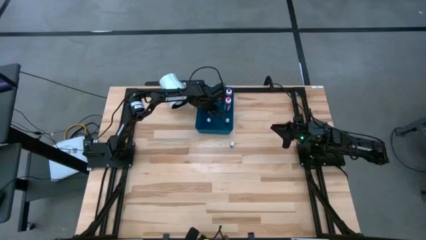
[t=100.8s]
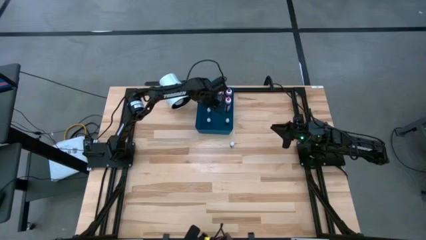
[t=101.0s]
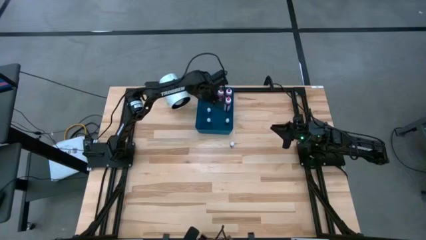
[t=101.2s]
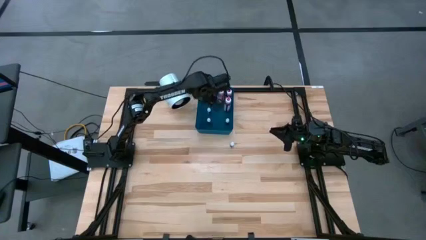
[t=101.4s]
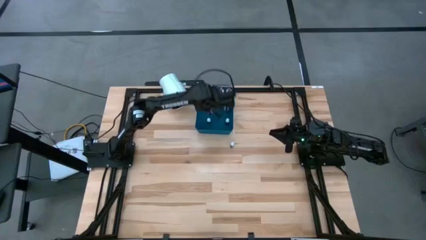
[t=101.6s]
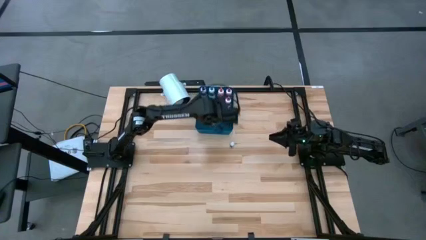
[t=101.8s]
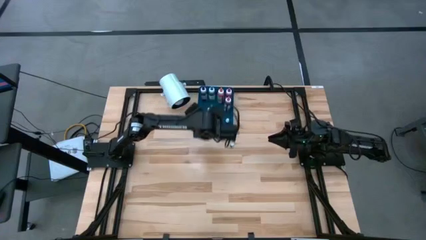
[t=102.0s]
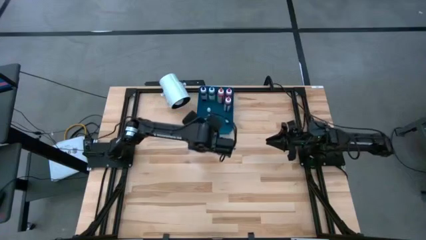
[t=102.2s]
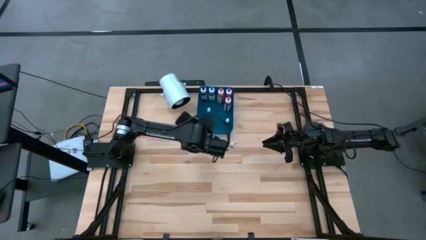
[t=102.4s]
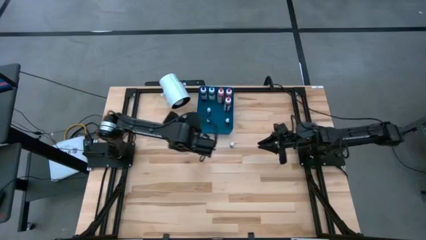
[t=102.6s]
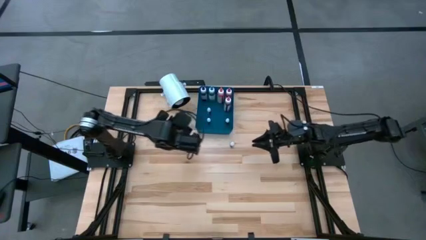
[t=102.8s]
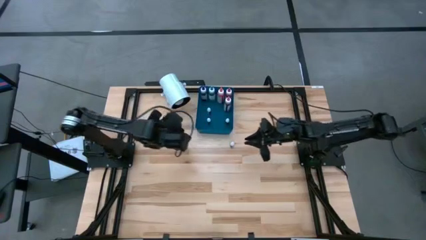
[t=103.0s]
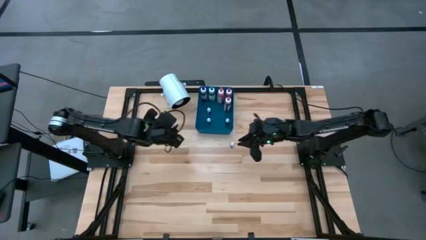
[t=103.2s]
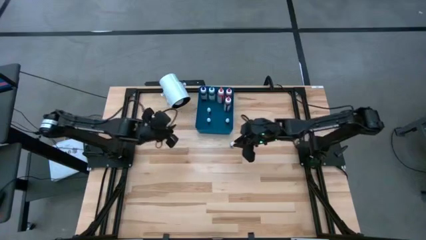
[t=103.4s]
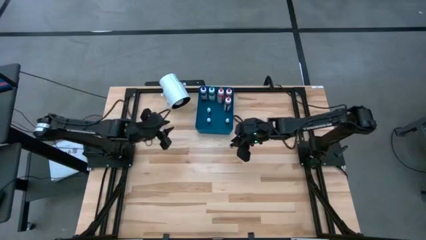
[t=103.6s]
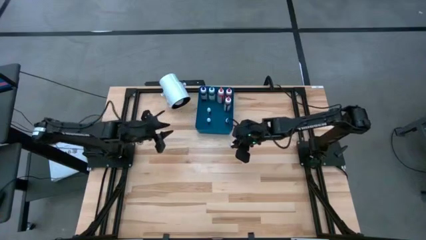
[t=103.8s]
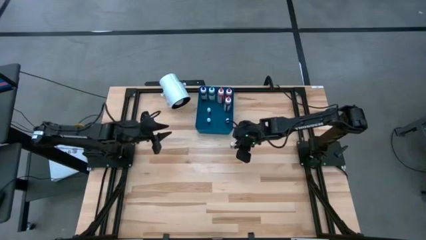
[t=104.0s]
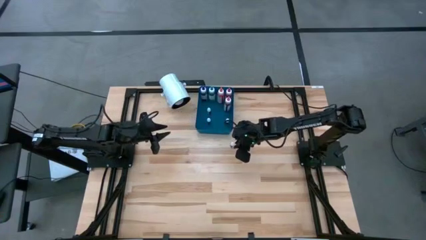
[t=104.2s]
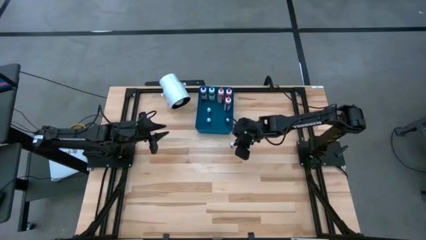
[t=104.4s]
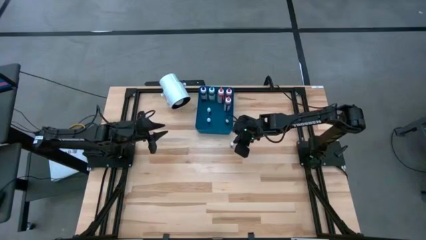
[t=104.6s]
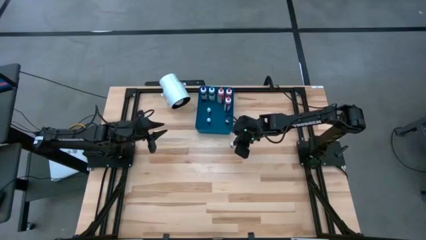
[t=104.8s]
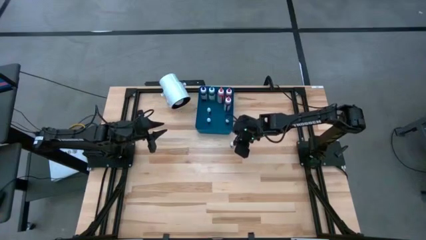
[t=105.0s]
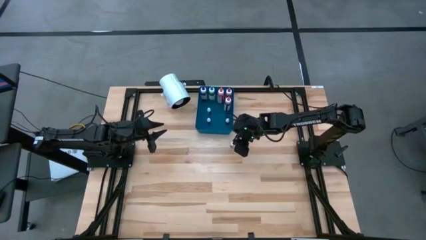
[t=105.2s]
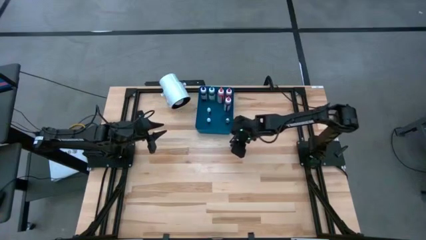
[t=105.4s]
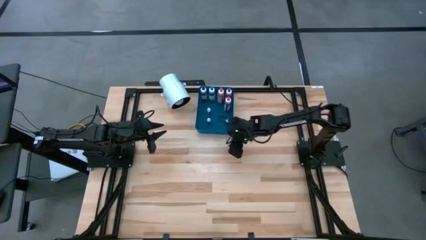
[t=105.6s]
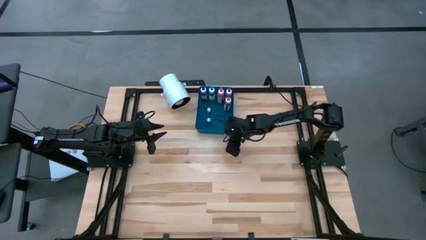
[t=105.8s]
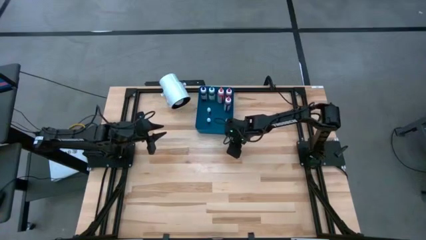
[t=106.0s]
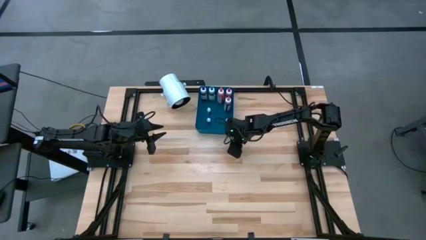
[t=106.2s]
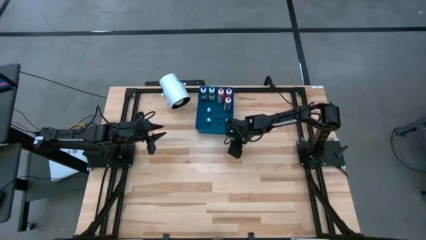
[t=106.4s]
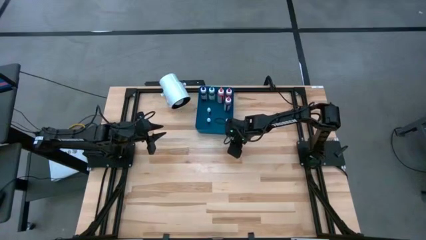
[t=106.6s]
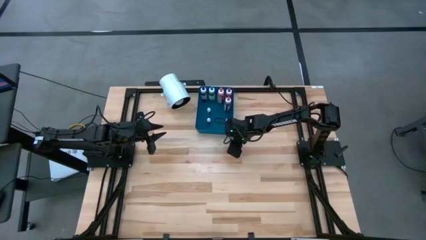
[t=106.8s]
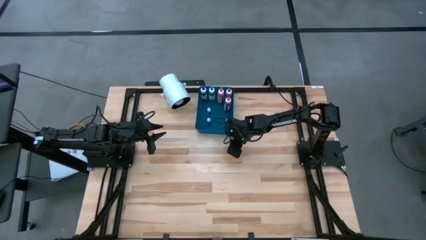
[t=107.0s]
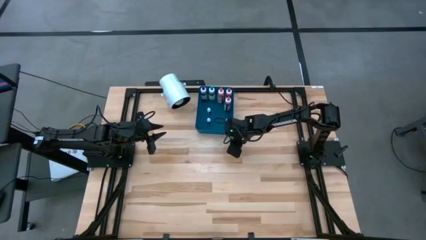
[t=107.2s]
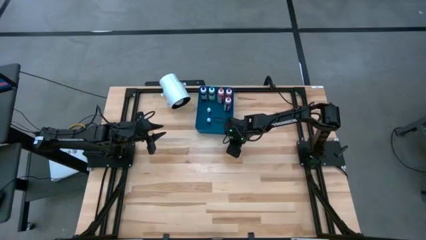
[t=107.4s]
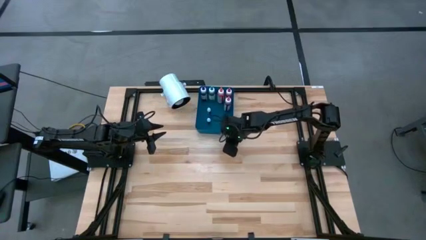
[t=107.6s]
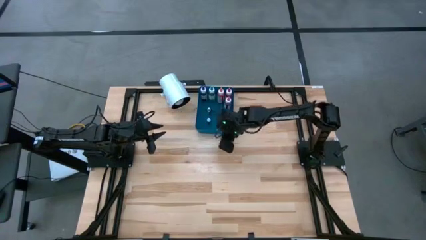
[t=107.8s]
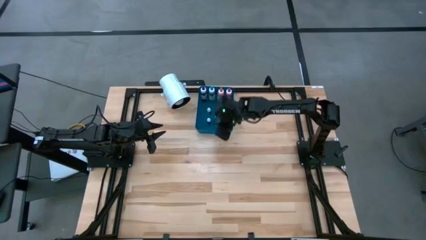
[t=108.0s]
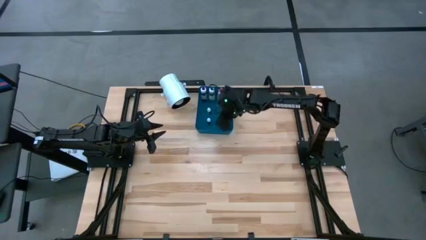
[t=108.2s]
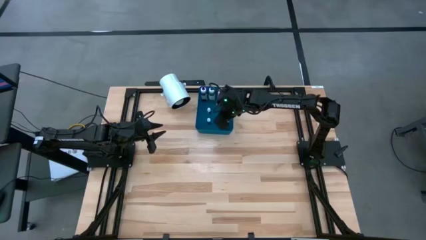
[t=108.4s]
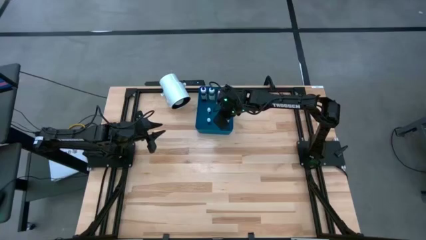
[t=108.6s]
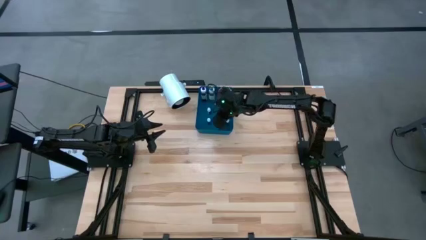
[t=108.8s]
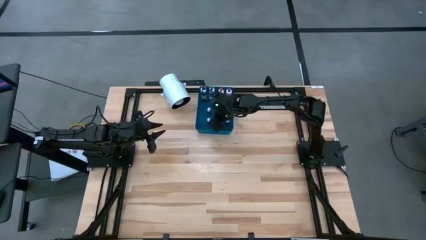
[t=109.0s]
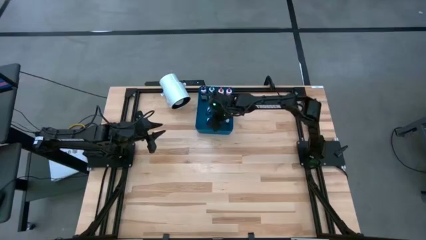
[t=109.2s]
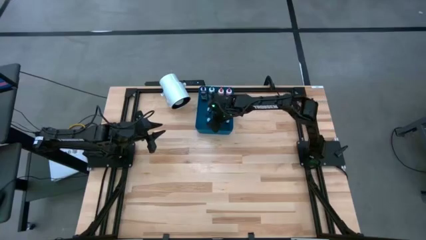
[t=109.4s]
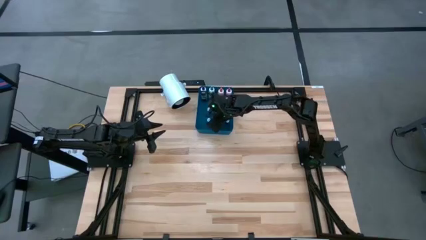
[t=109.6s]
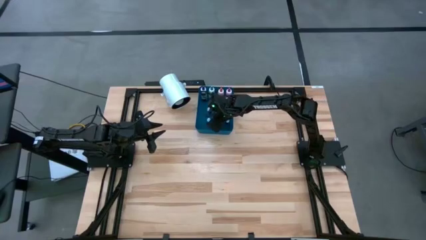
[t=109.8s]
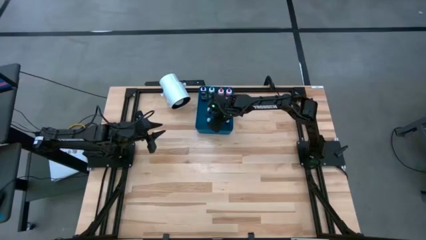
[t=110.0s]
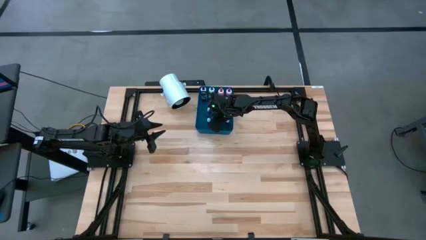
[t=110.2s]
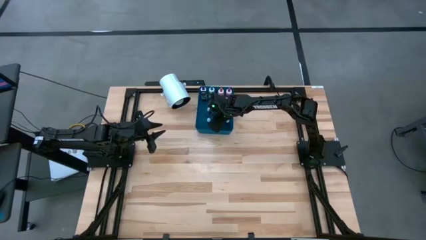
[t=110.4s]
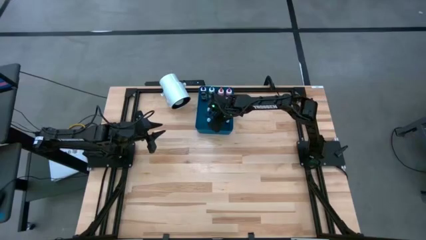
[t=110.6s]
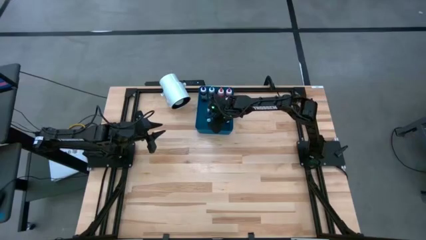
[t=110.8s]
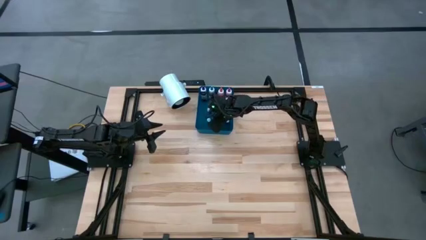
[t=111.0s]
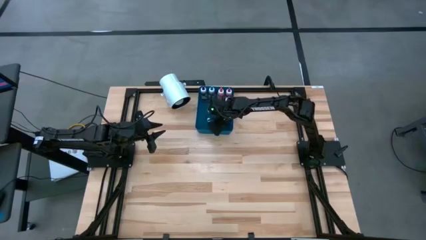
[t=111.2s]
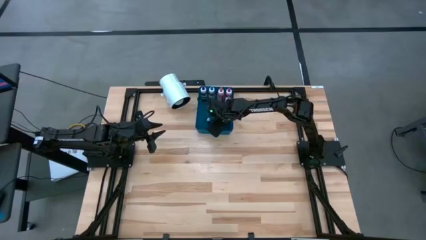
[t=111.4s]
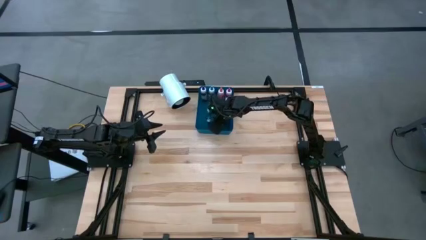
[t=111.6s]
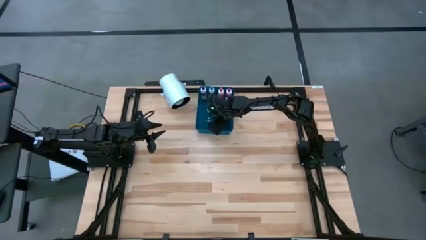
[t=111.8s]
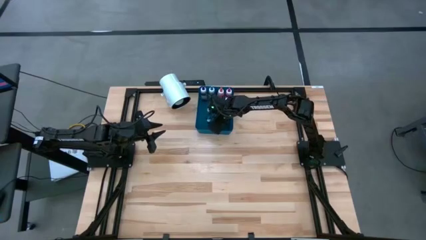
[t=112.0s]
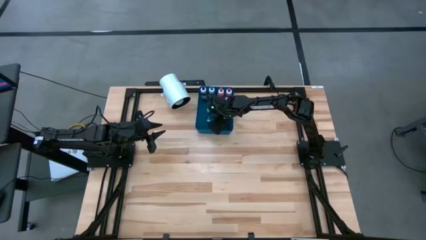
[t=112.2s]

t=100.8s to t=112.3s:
Task: Pick & Place food coloring
Put the small green food coloring bottle into the blue bin

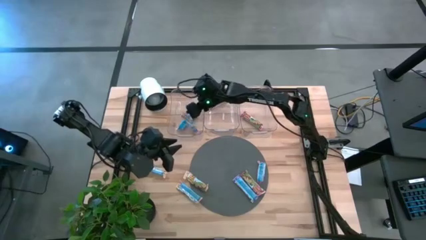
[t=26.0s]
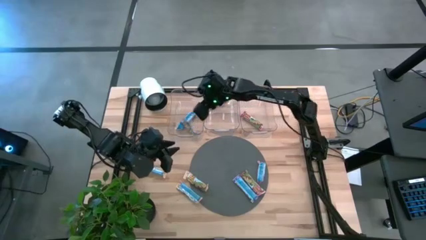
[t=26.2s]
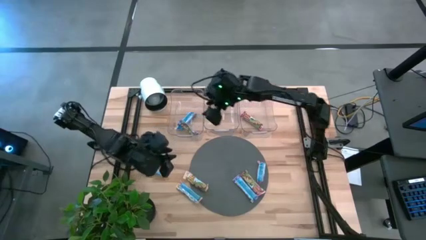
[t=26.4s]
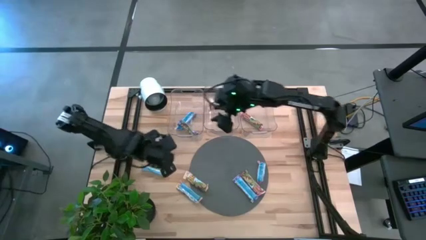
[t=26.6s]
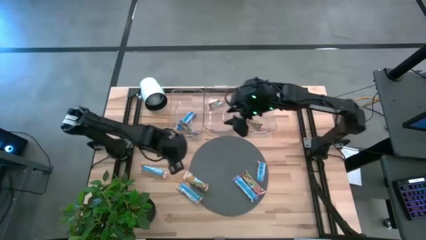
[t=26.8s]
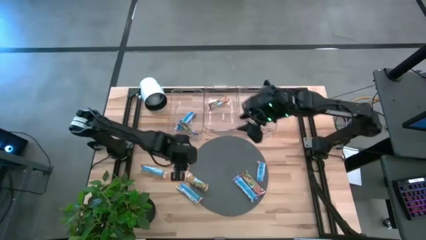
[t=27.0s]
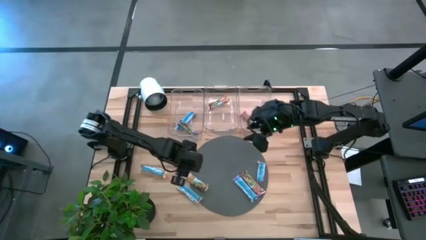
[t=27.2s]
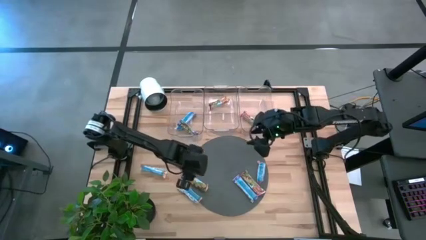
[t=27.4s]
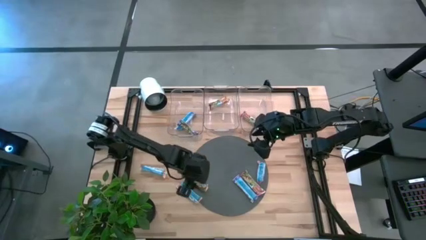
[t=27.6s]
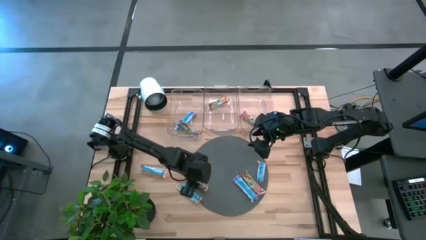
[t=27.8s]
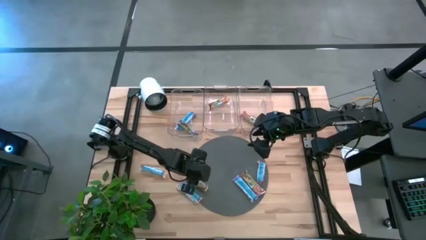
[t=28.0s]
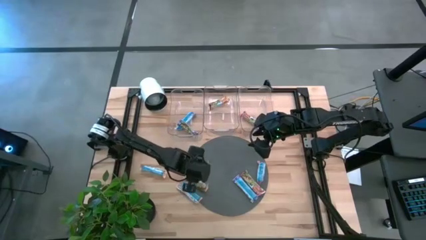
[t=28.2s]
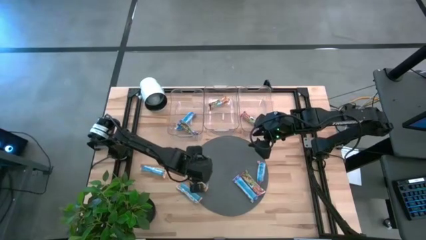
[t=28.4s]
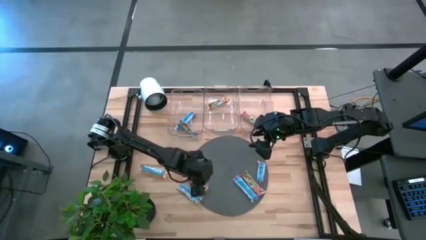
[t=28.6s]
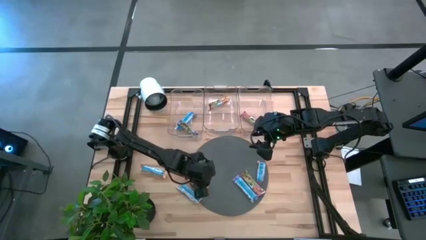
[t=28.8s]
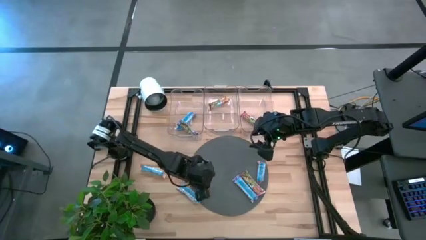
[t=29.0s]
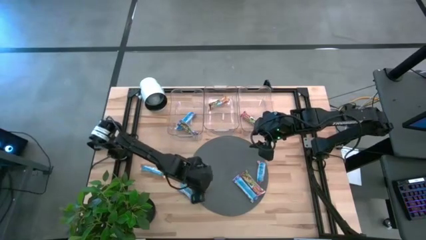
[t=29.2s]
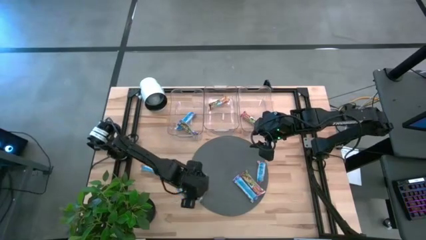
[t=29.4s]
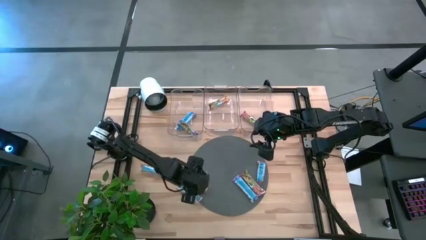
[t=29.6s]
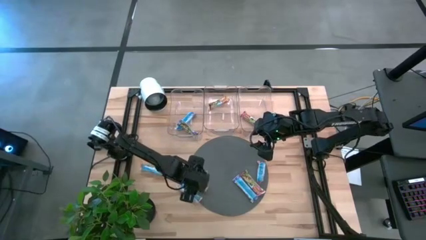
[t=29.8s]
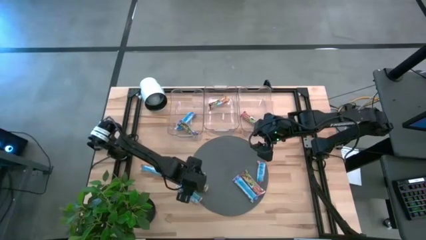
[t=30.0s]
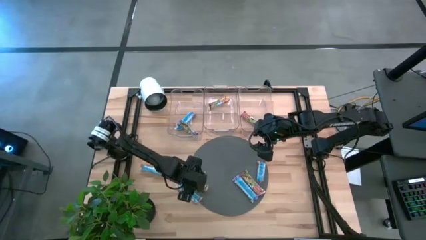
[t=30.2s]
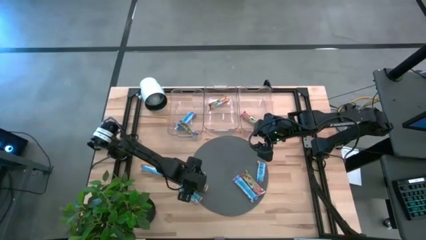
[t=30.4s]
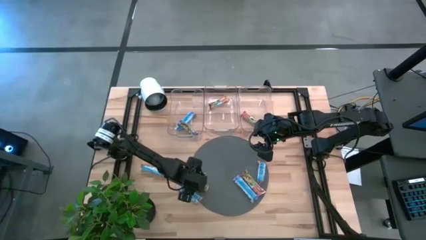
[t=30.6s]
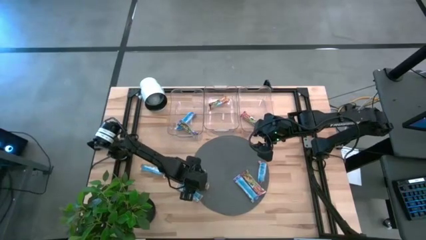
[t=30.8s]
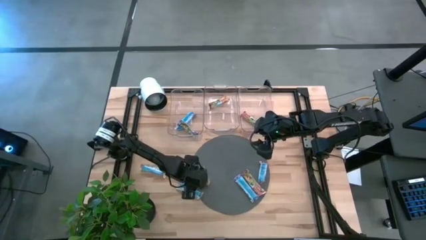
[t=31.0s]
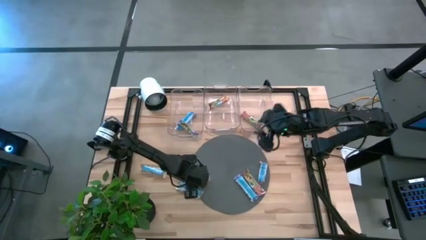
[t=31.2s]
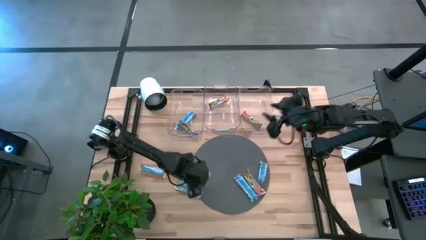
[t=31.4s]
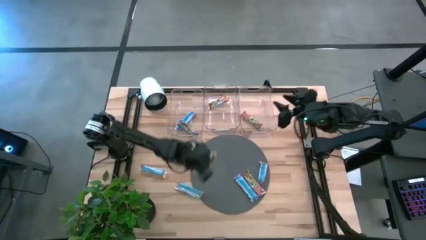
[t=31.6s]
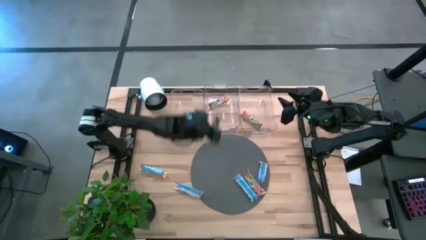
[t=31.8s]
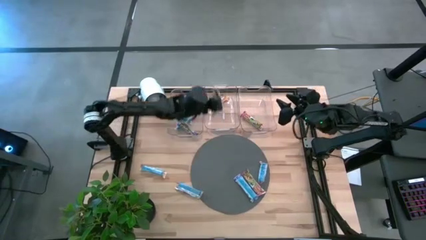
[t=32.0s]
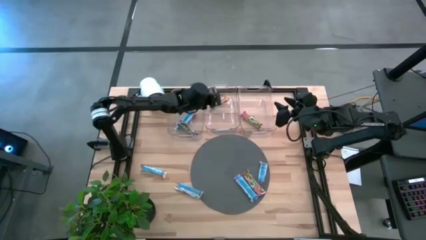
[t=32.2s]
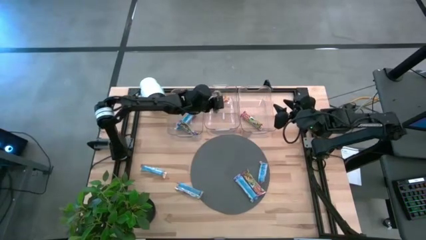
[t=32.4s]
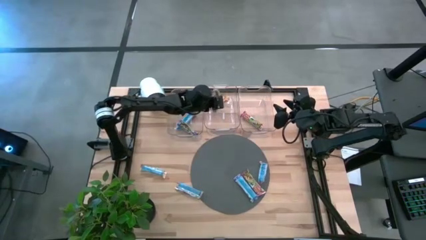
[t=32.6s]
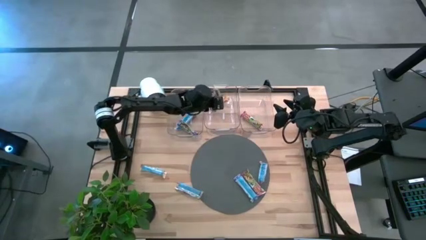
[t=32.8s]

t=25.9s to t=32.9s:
Task: Pick and place Granola Bars by type
Put the yellow granola bar into the middle bin
